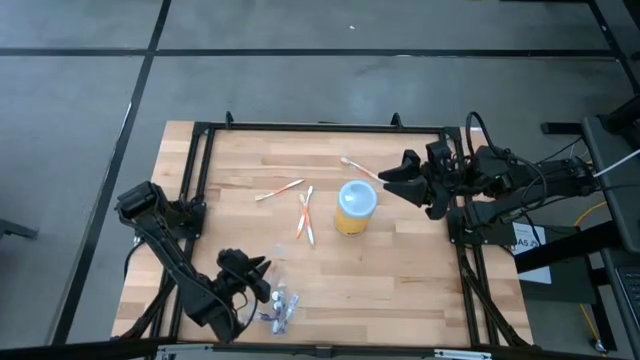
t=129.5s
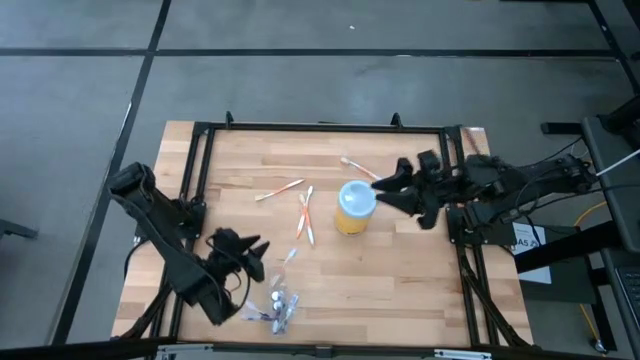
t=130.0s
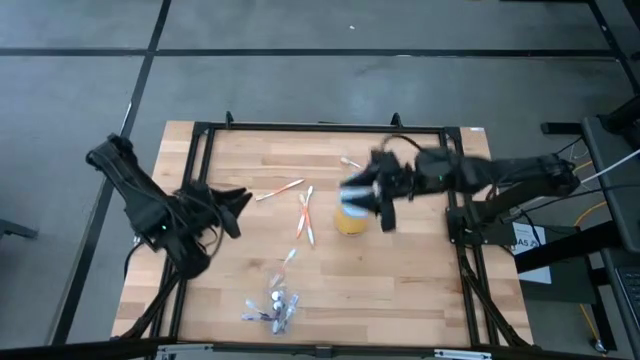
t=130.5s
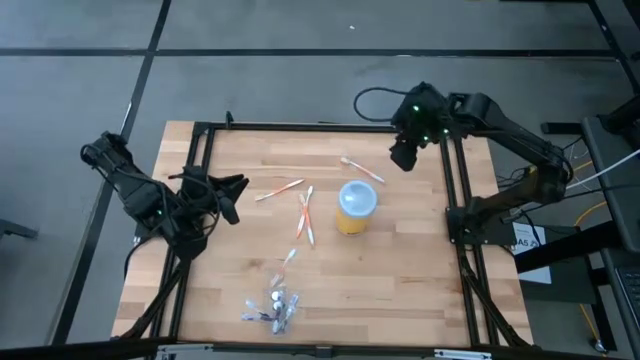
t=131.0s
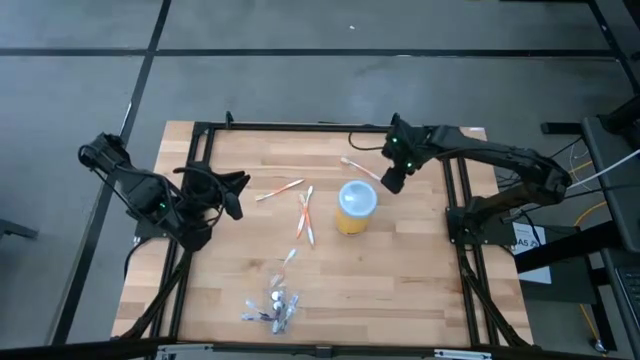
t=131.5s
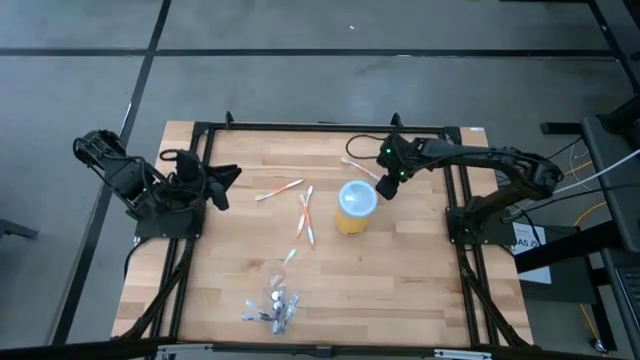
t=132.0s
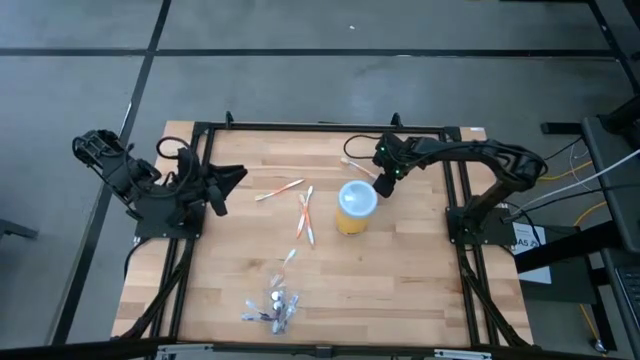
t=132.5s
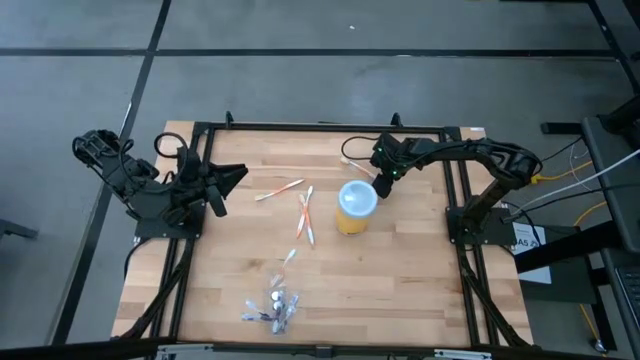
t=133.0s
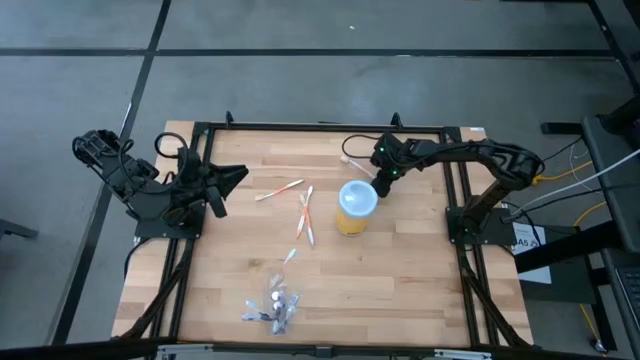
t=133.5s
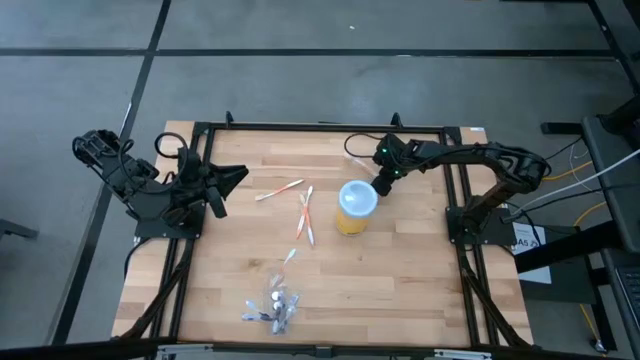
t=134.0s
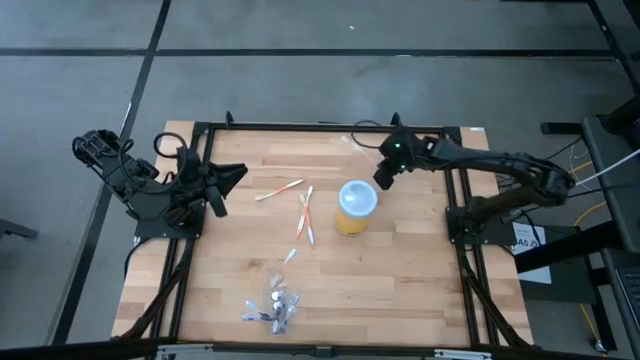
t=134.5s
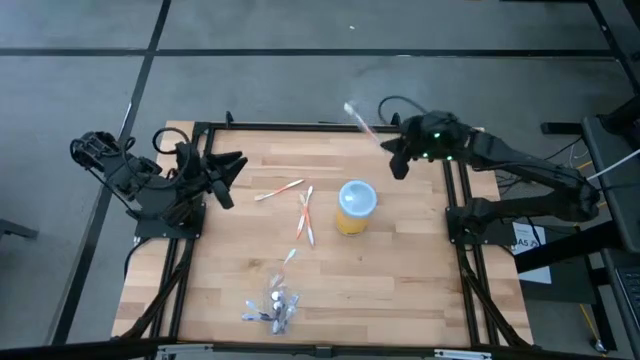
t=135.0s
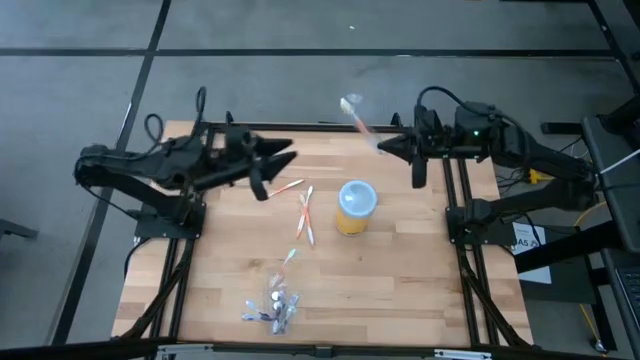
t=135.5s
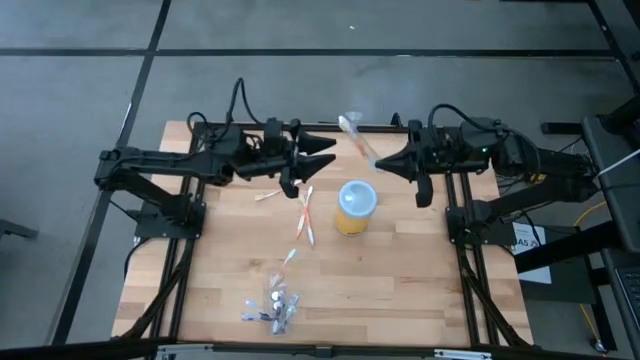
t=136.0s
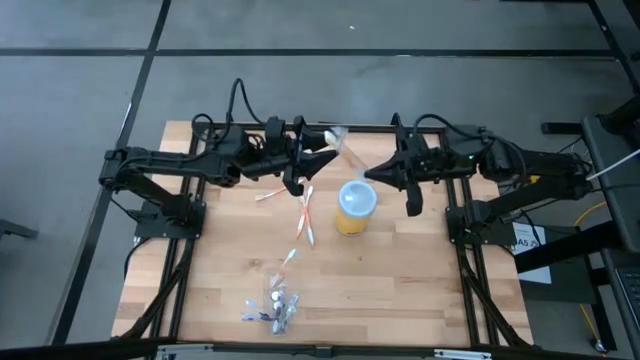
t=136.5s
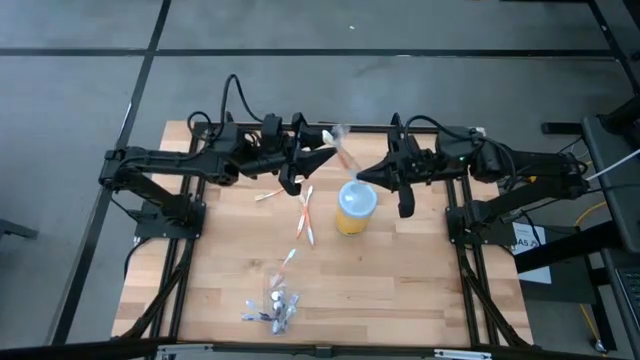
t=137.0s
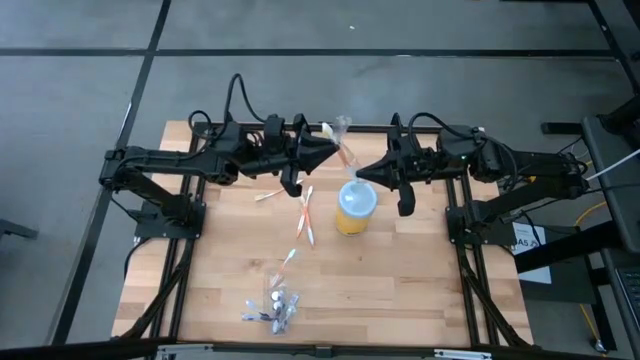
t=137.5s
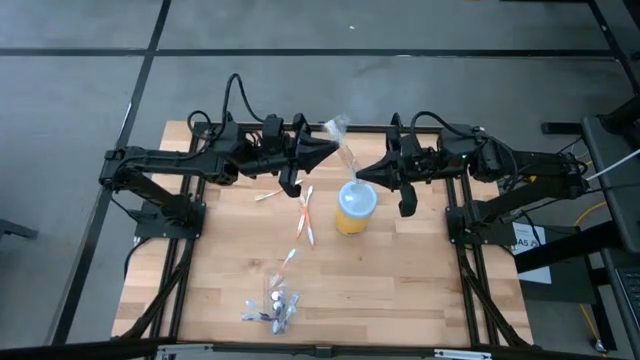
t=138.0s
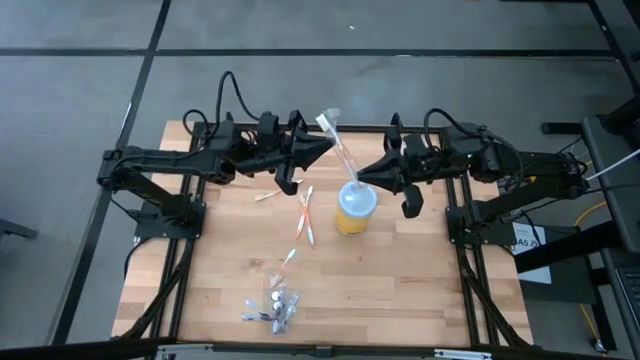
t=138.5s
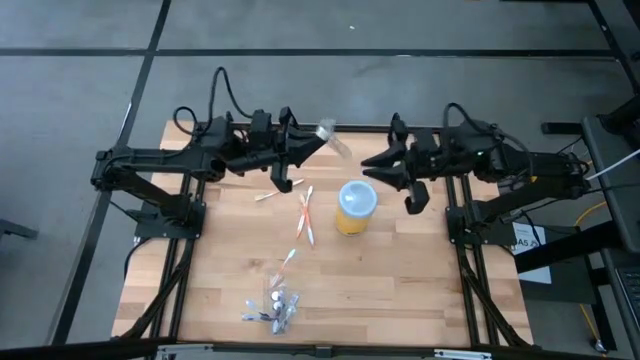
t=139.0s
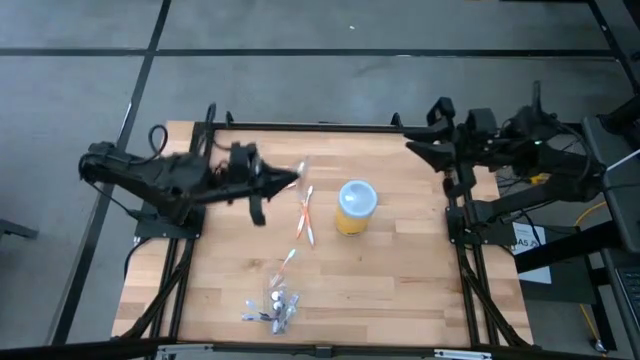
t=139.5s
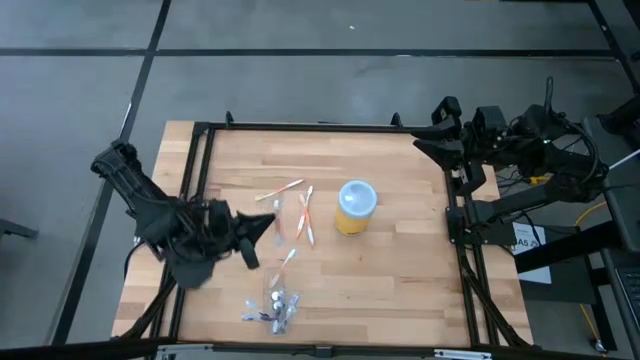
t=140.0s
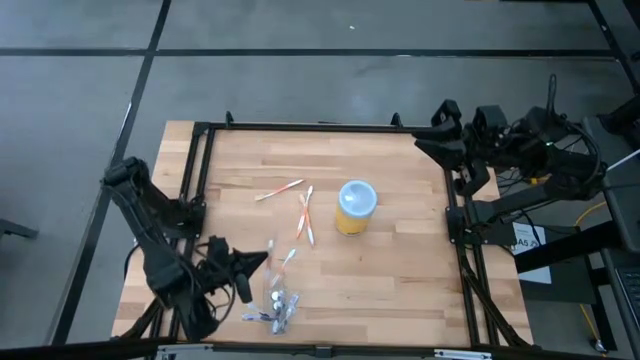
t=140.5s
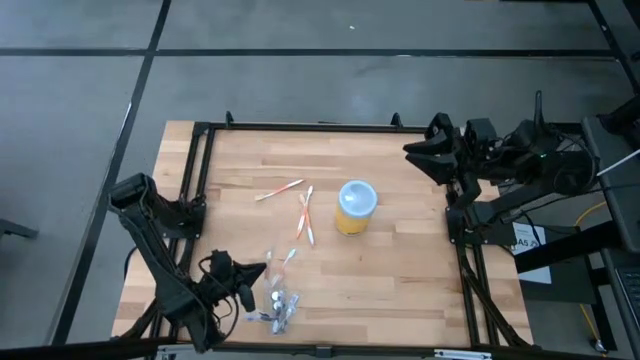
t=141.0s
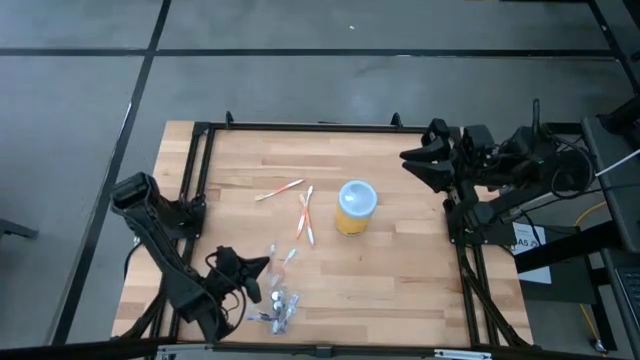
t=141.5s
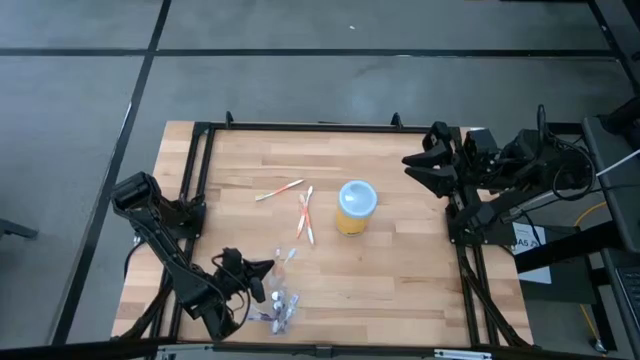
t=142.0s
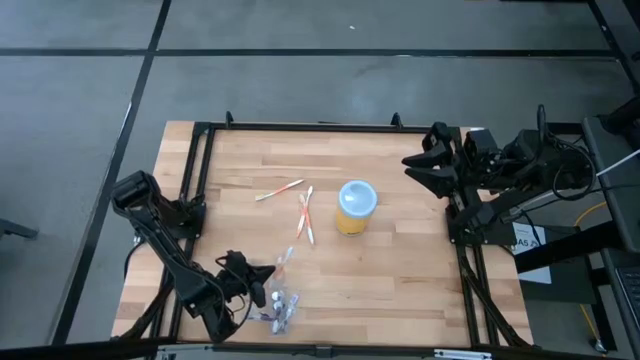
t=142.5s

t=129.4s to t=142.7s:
Task: Pick & Place toothbrushing station
Put the orange toothbrush into the left side of the transparent organizer

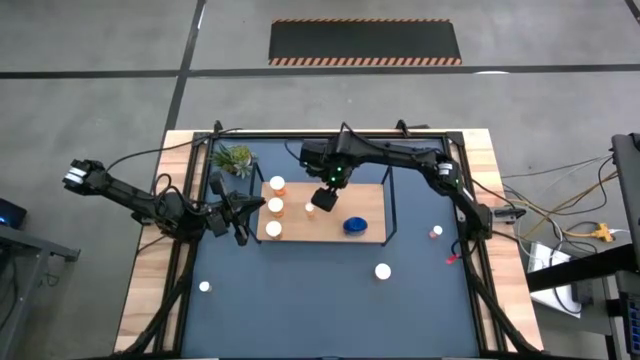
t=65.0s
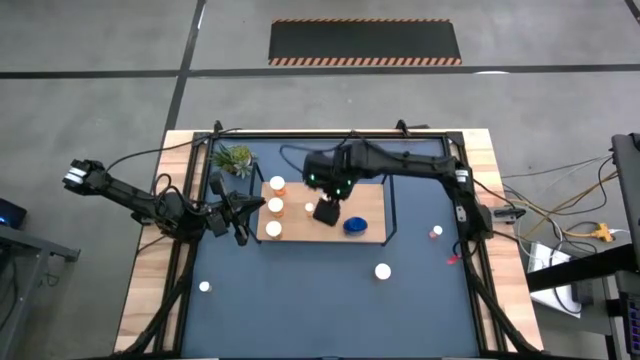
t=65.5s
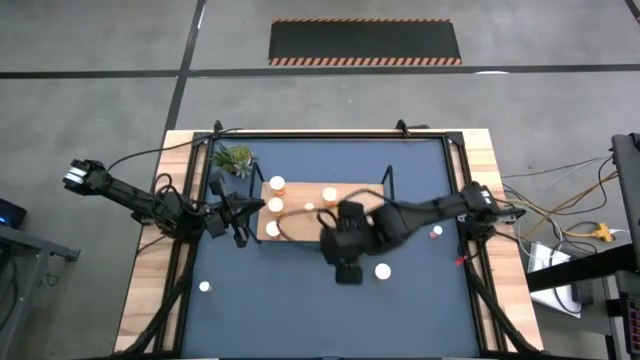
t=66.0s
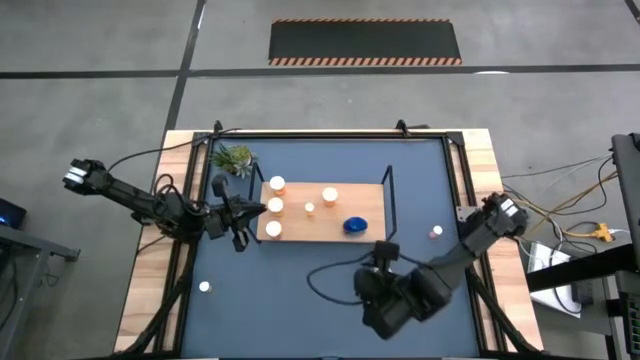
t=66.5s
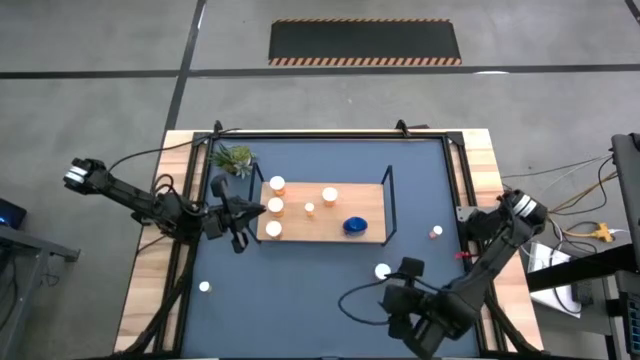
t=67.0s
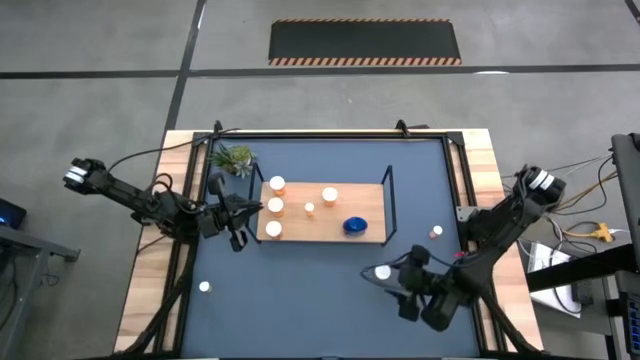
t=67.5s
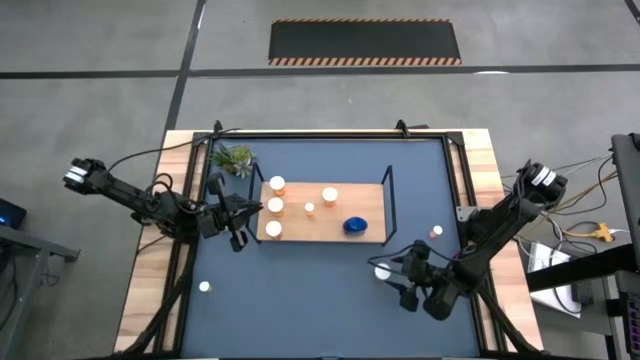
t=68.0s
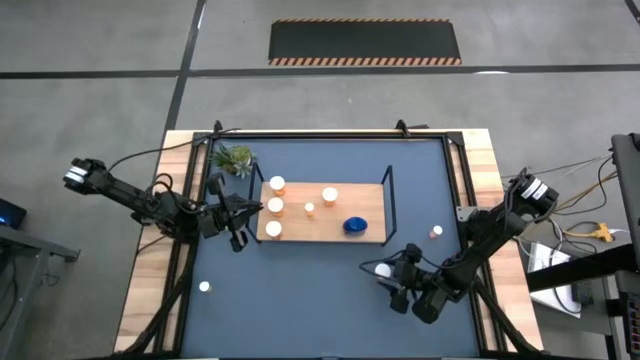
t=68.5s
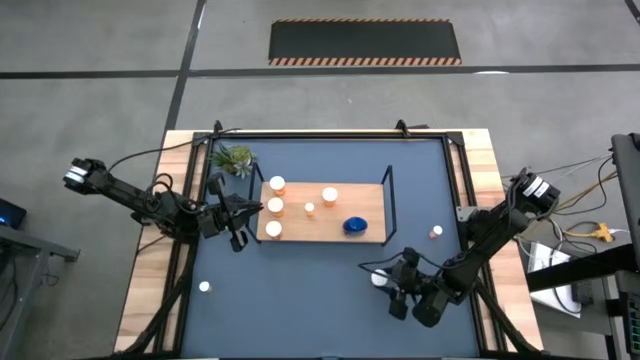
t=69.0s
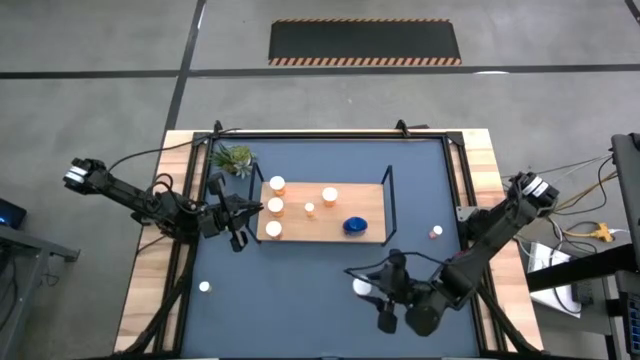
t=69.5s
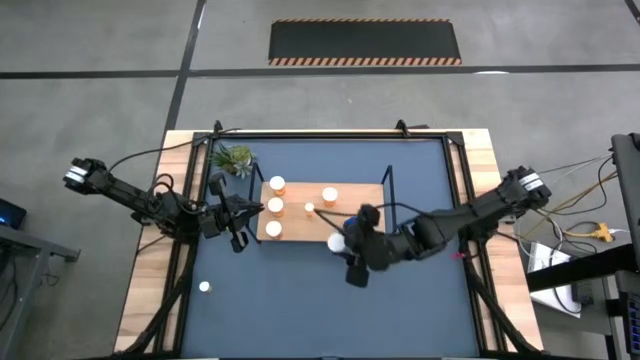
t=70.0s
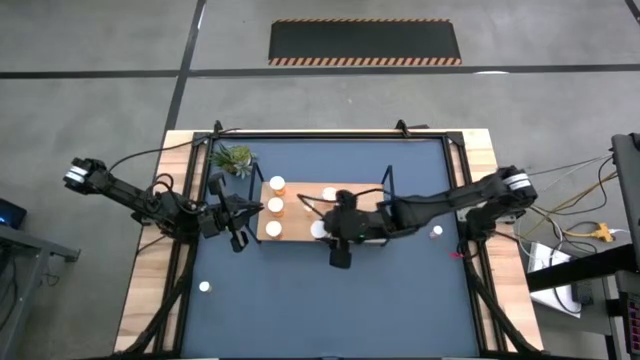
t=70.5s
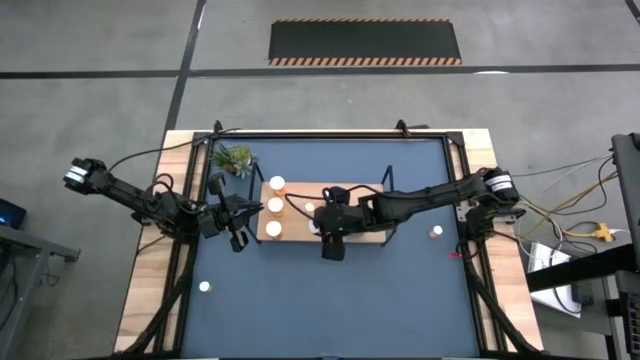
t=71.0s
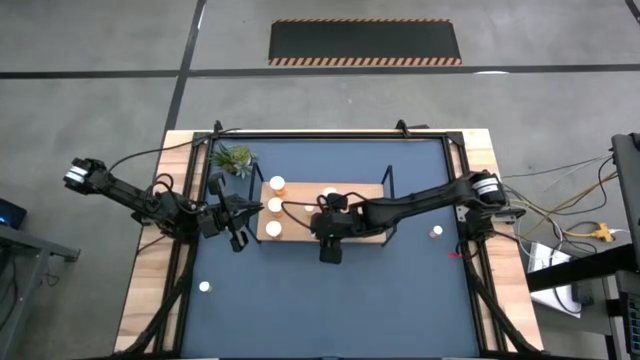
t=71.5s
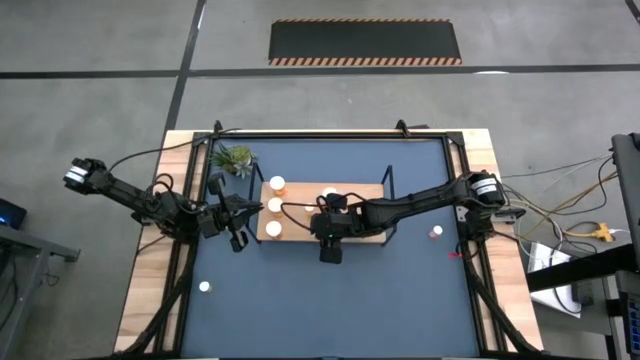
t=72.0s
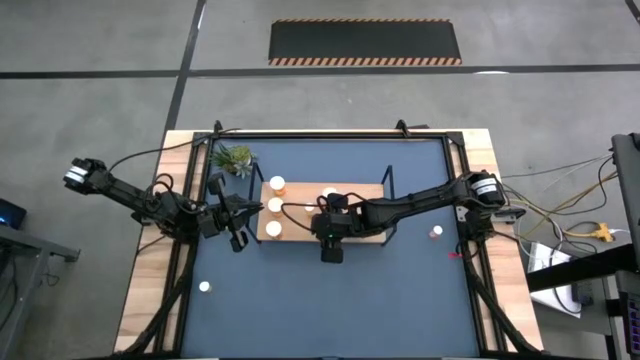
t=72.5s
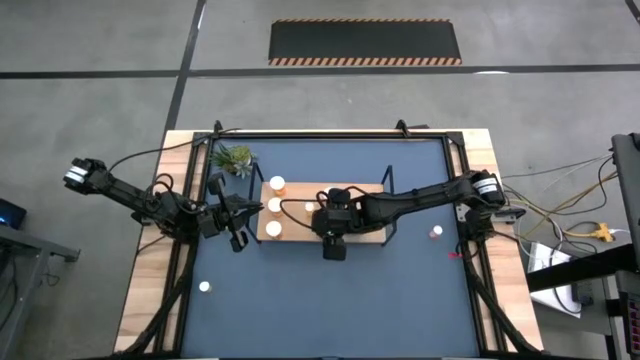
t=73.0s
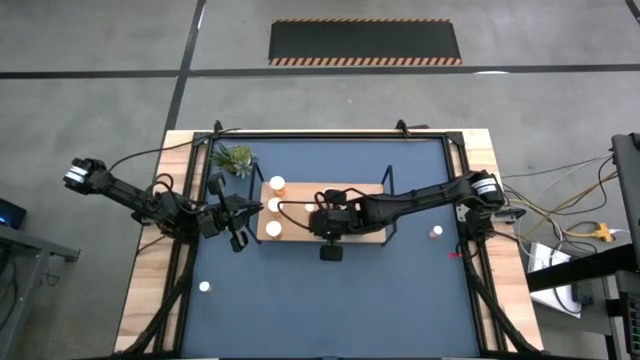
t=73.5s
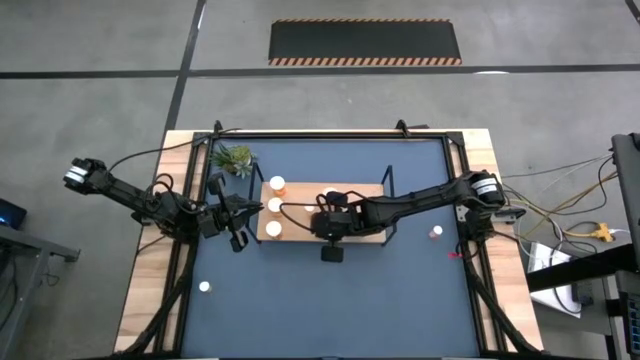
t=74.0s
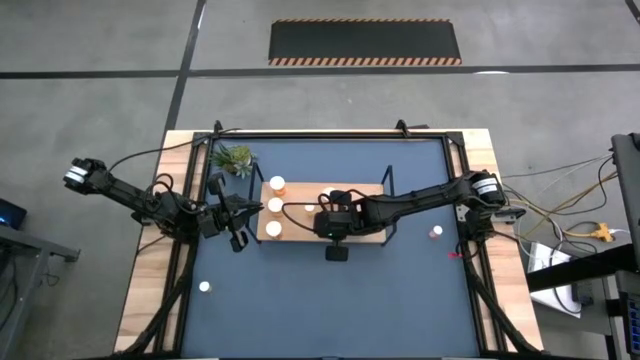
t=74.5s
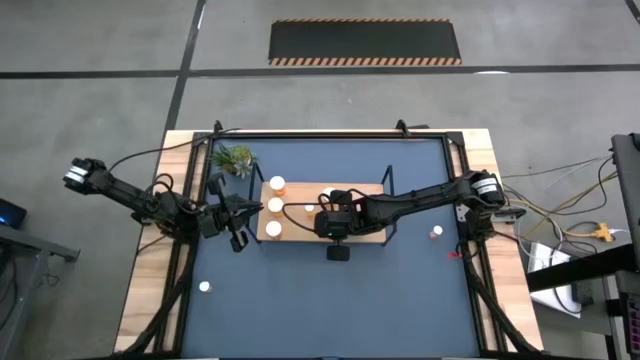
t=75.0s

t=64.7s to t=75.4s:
Task: Pick and place medicine bottles onto shelf by color
Put the big orange pill bottle on to the shelf aligned with the other big orange pill bottle
